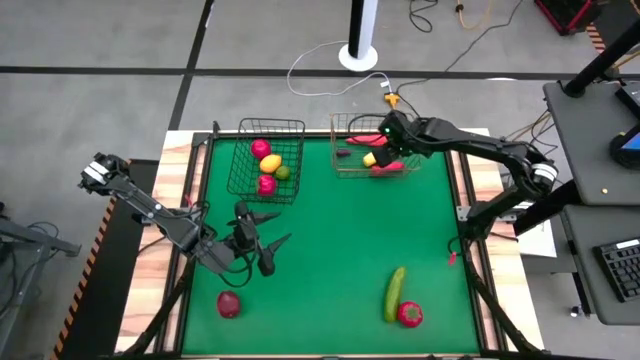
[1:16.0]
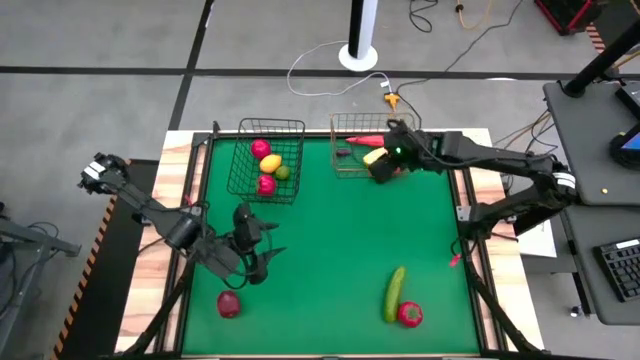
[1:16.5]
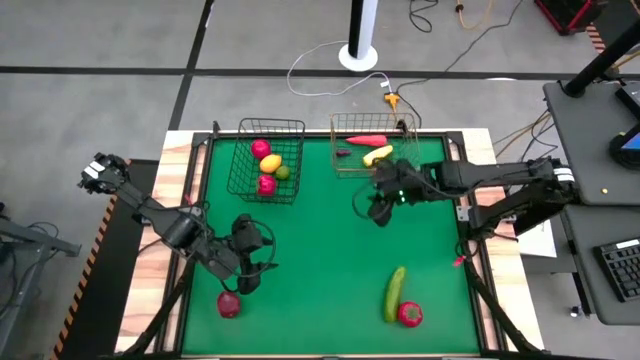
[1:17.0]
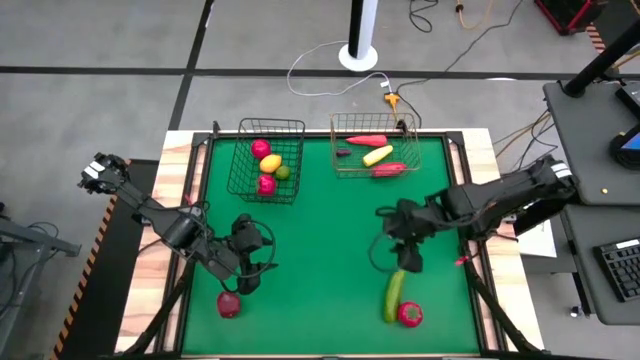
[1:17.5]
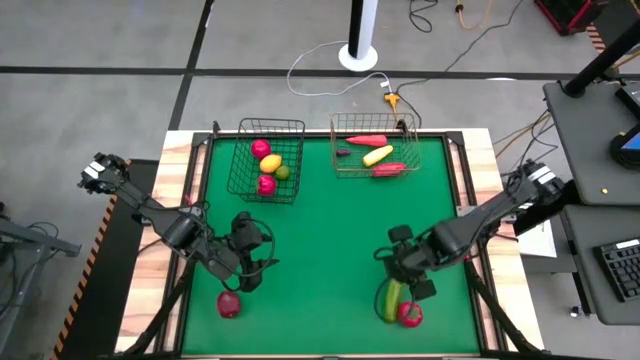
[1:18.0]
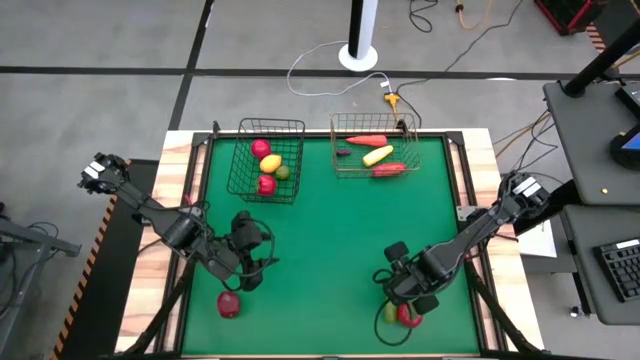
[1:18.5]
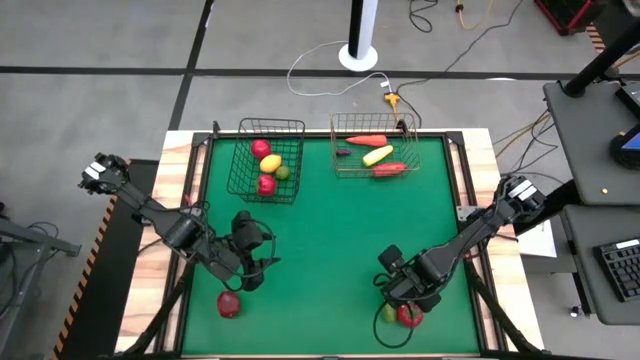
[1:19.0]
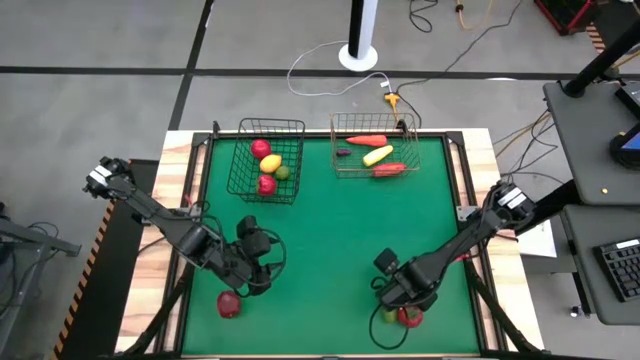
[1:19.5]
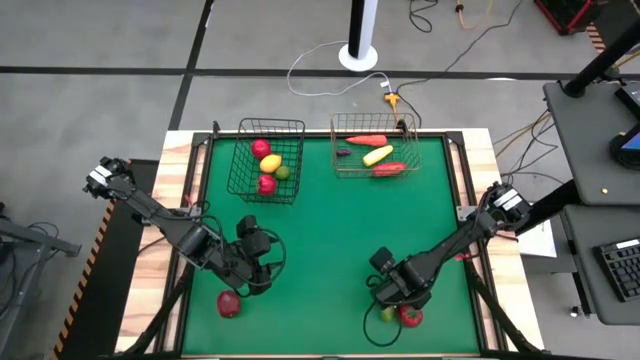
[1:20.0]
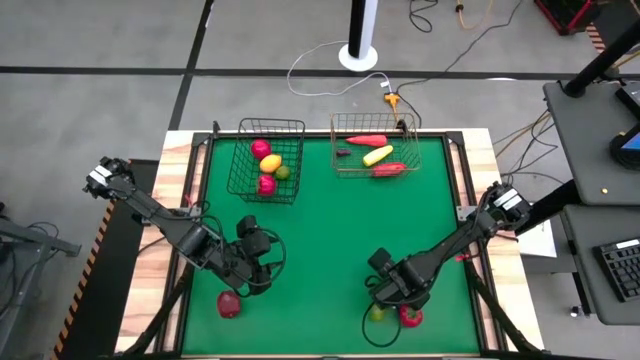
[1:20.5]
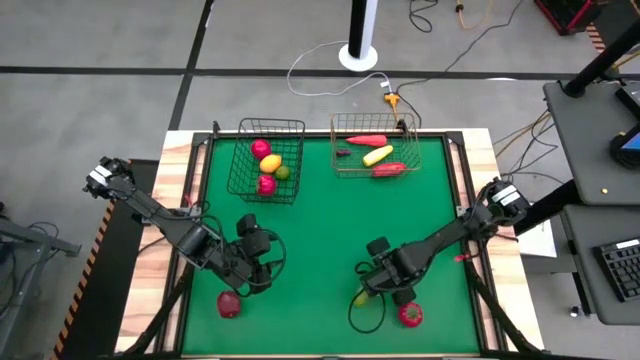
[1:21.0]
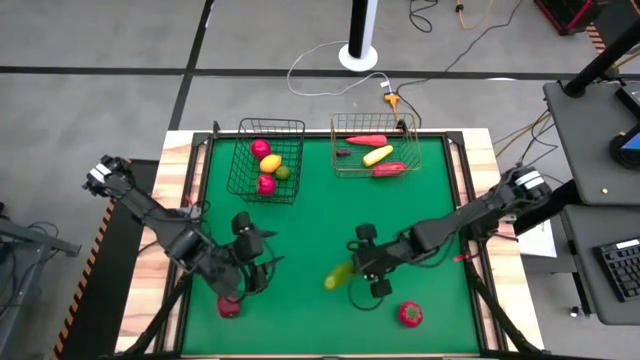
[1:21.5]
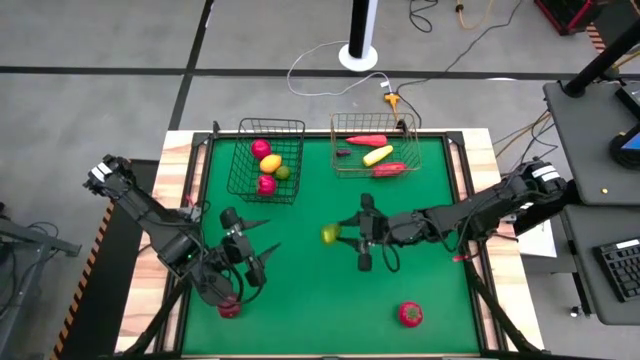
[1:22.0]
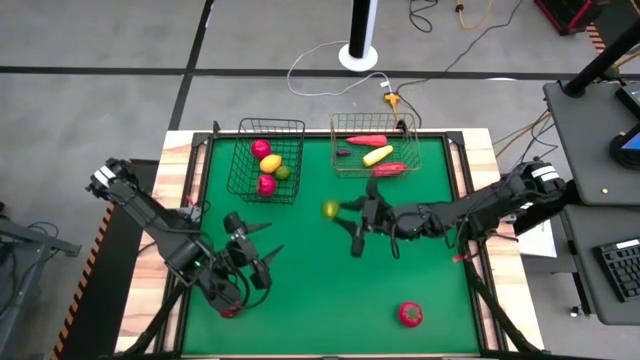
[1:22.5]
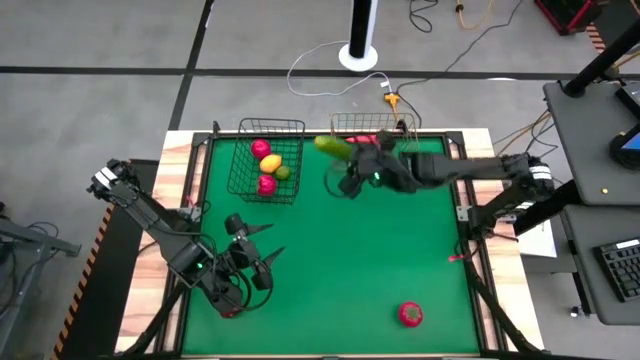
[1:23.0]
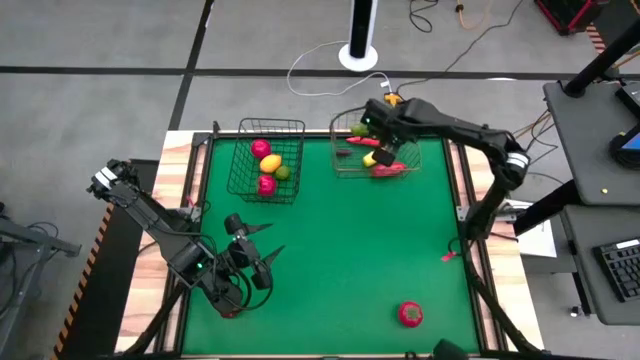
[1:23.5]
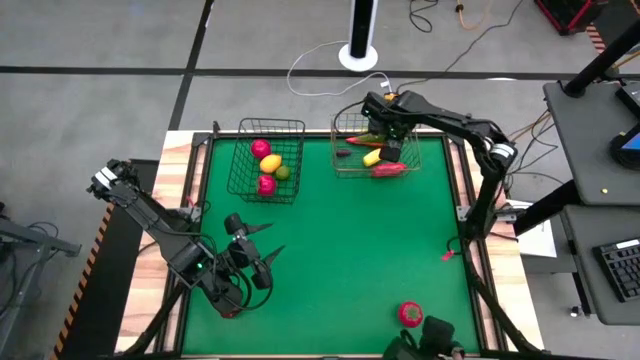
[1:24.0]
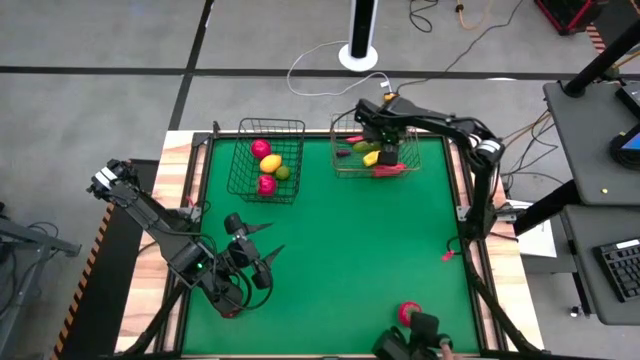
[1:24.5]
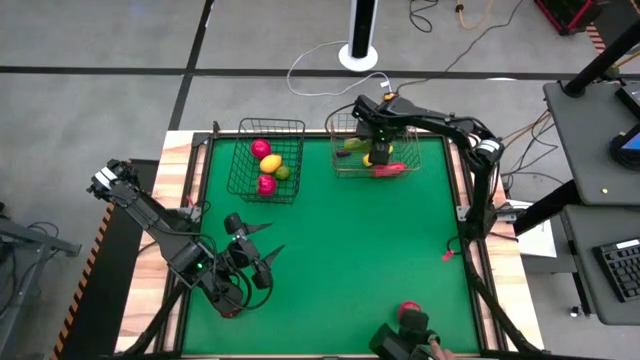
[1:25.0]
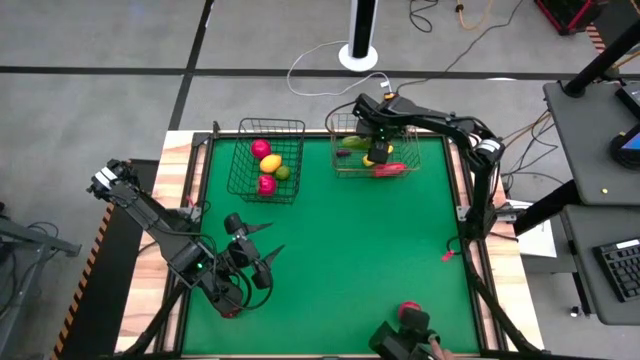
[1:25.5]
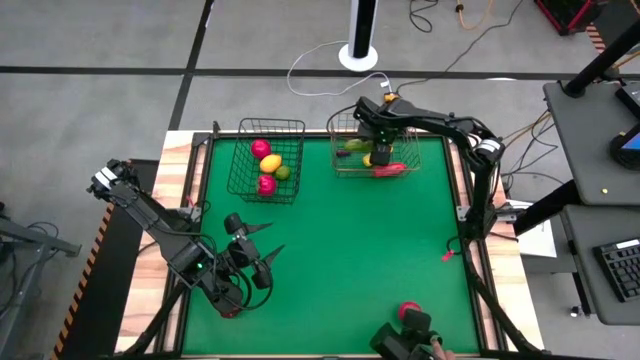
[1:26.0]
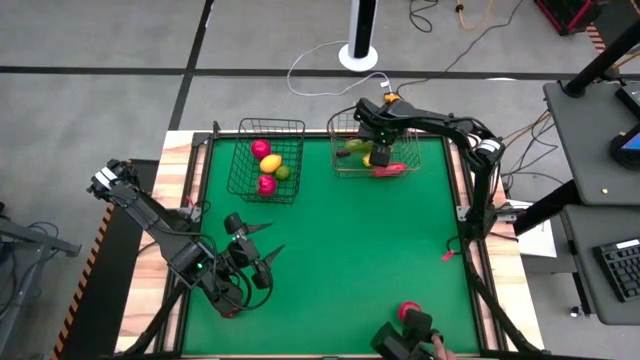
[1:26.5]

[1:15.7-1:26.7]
Task: Sort produce into baskets
Put the cucumber into the gold wire basket

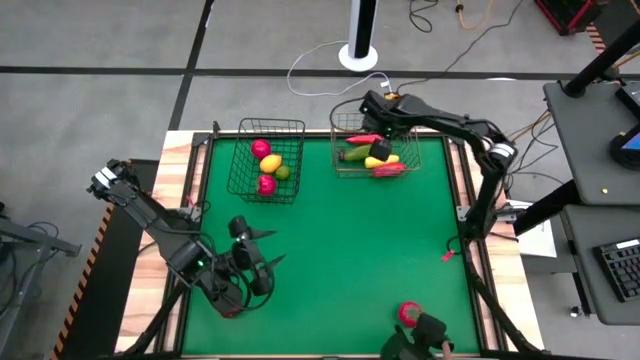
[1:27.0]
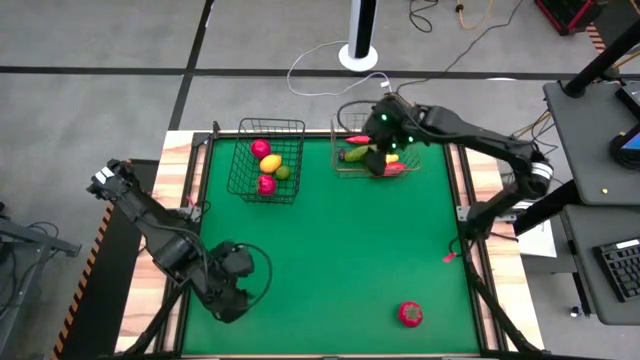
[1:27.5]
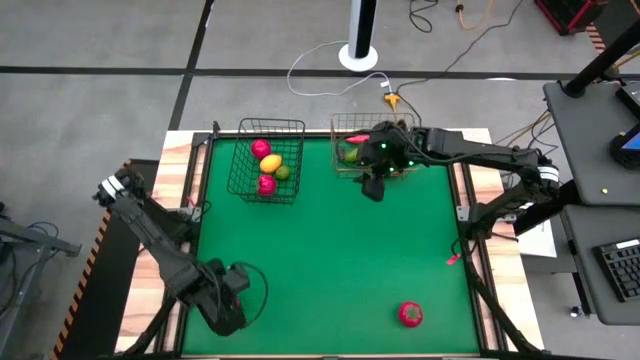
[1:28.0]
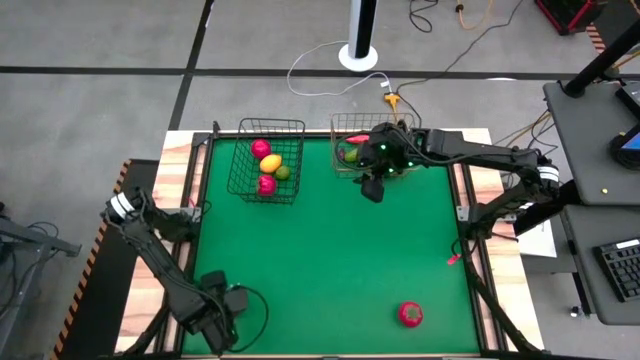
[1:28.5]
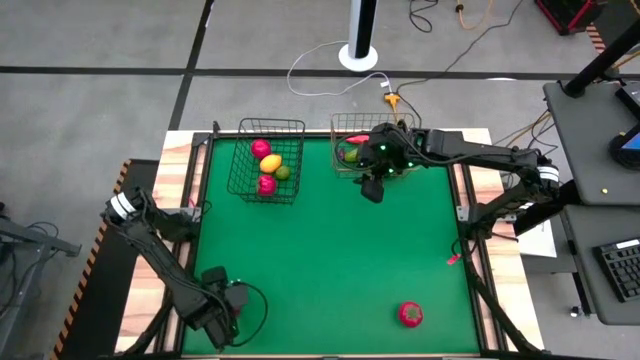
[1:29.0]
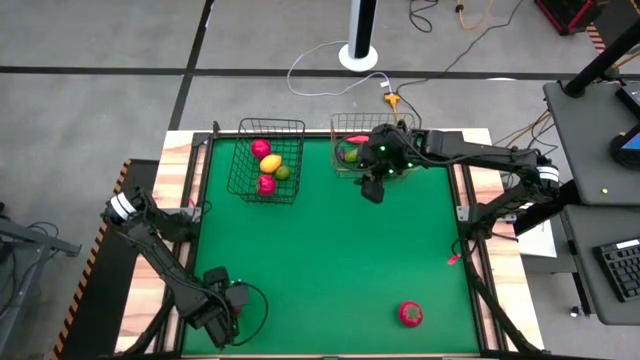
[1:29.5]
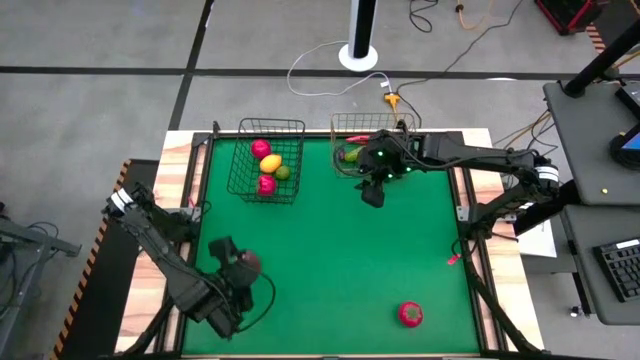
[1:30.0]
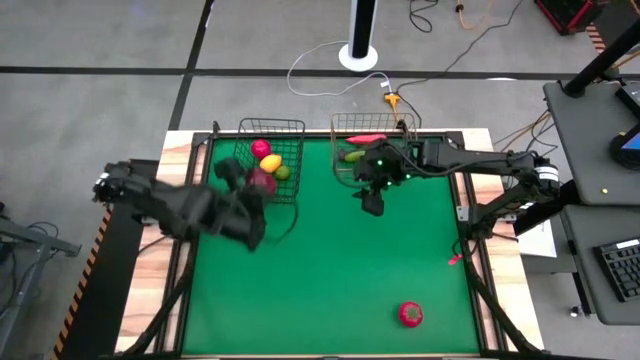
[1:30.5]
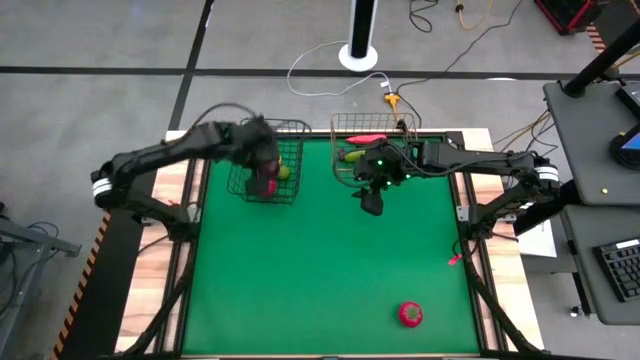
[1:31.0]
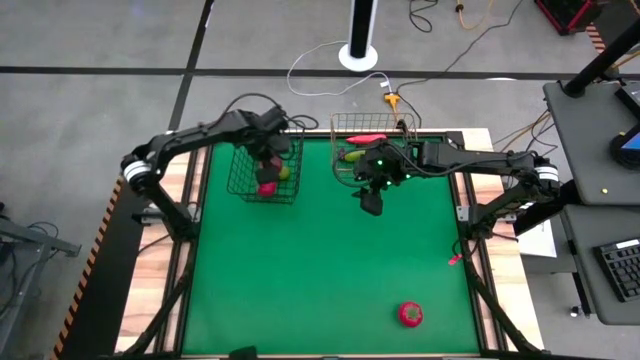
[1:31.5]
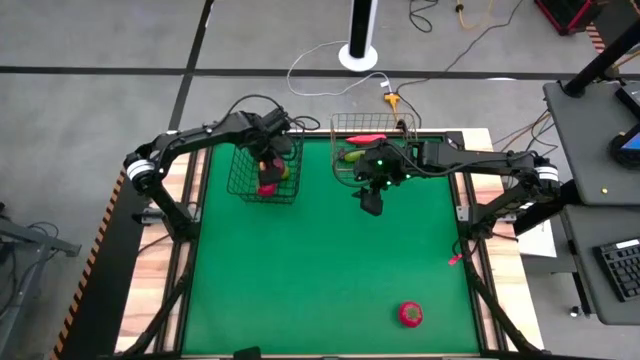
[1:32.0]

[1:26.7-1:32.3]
Put the apple into the black wire basket

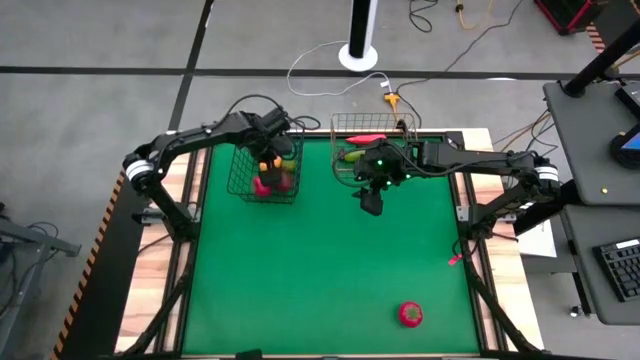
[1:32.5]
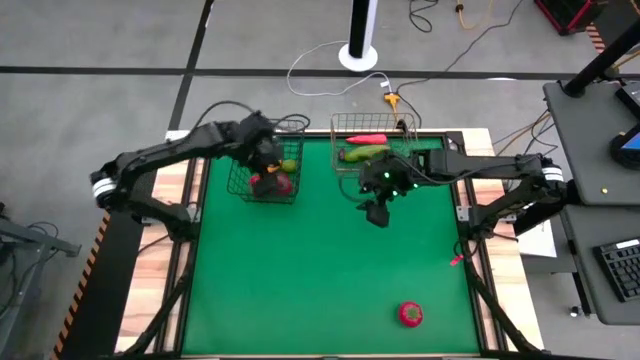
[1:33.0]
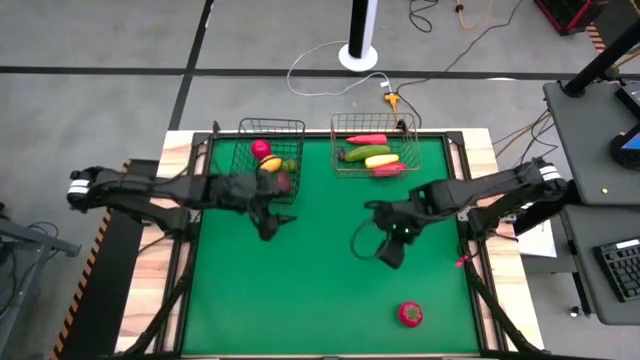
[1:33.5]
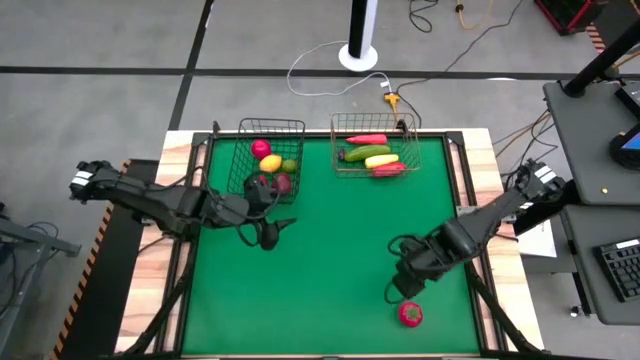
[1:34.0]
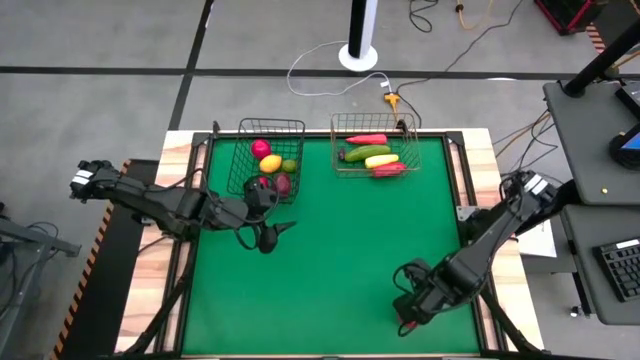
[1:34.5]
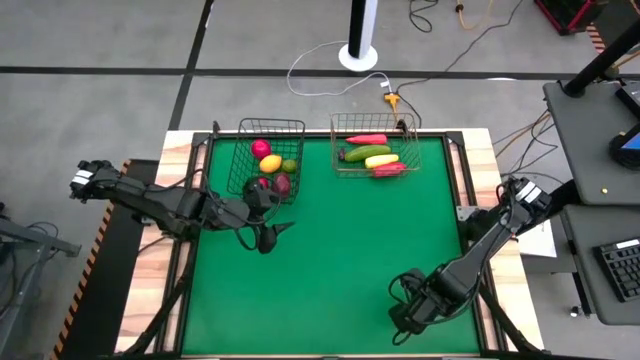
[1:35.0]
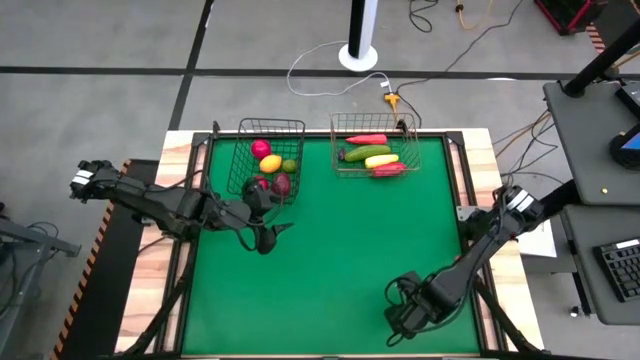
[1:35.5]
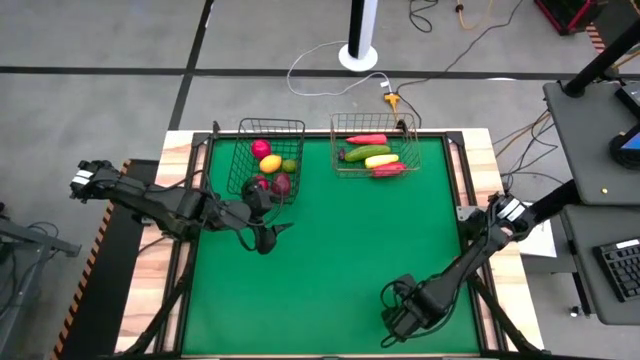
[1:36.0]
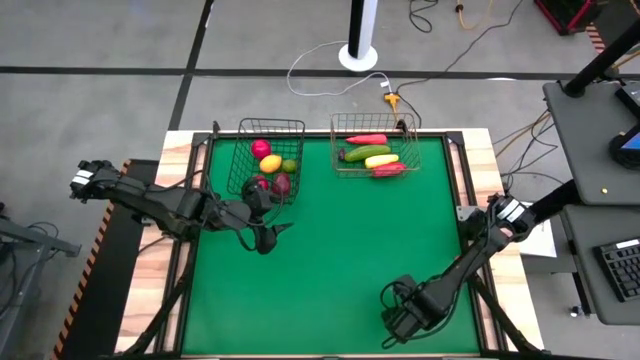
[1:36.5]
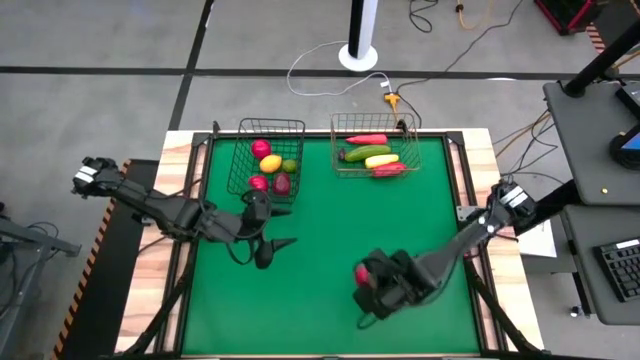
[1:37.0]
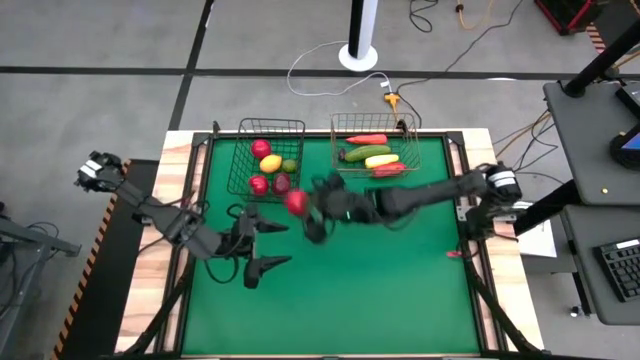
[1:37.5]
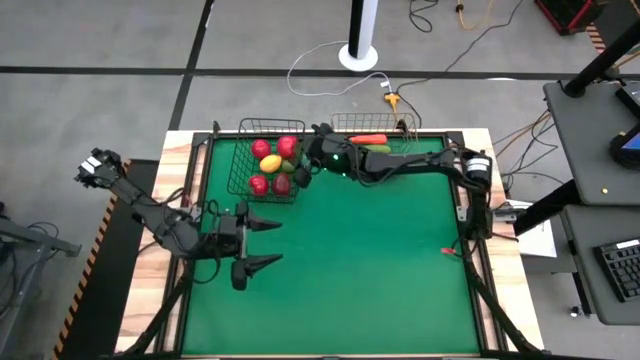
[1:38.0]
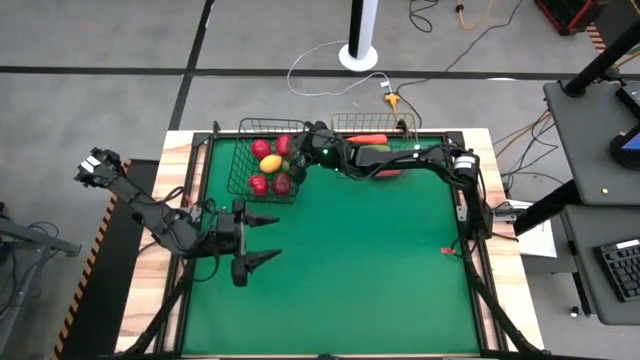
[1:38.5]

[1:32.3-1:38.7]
Put the tomato into the black wire basket
